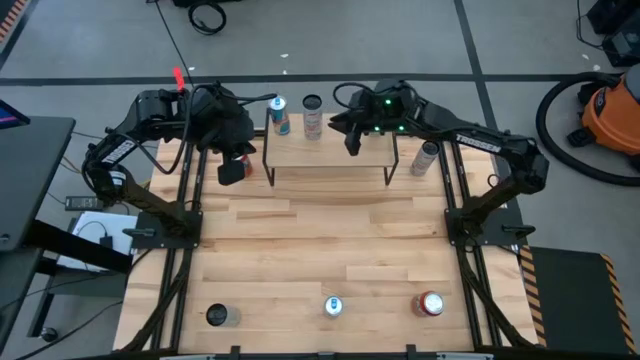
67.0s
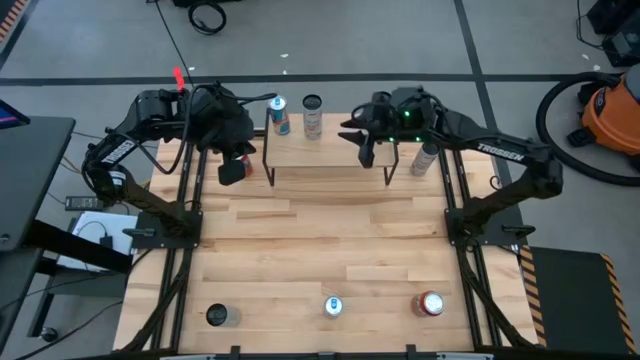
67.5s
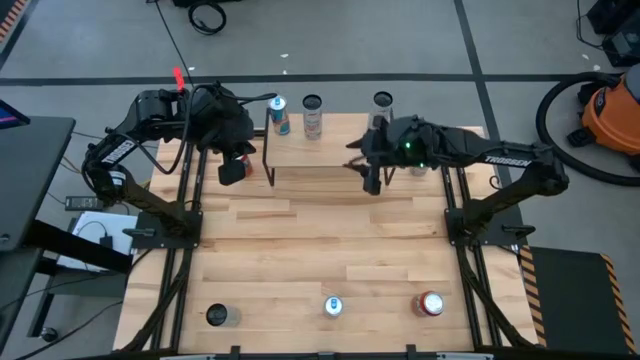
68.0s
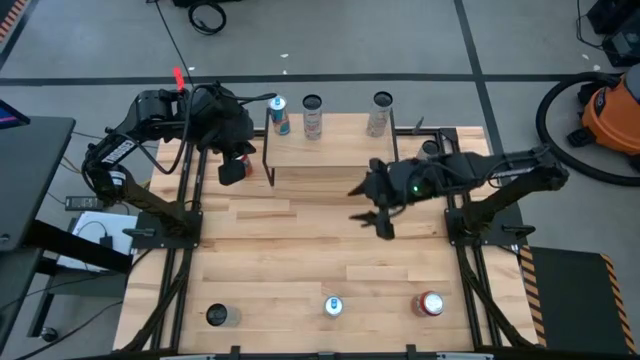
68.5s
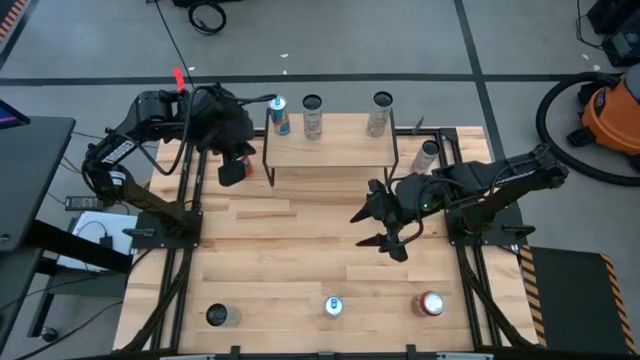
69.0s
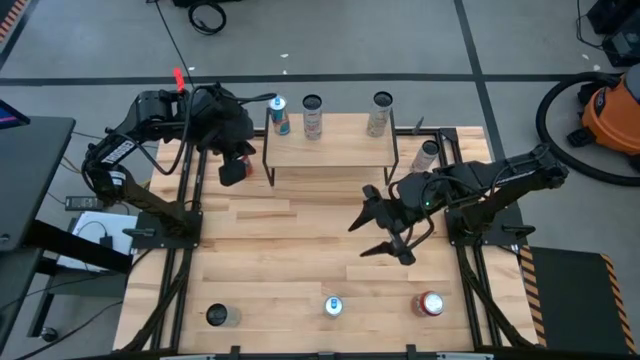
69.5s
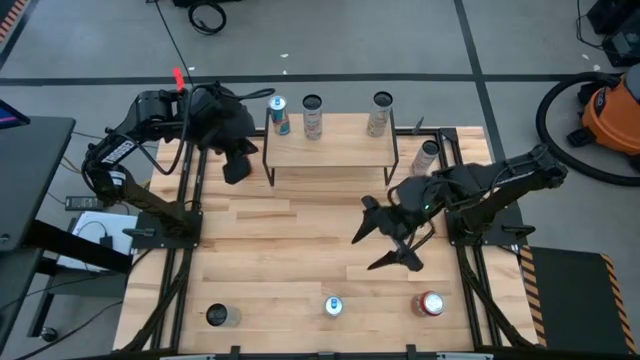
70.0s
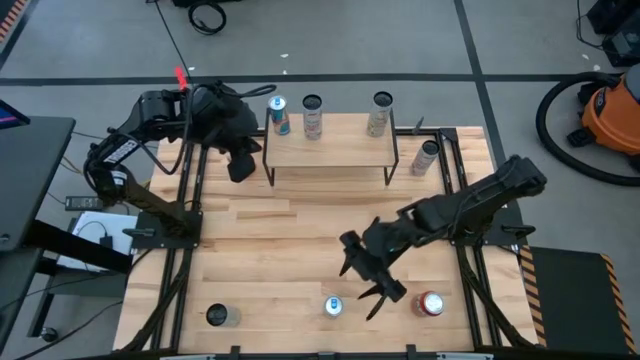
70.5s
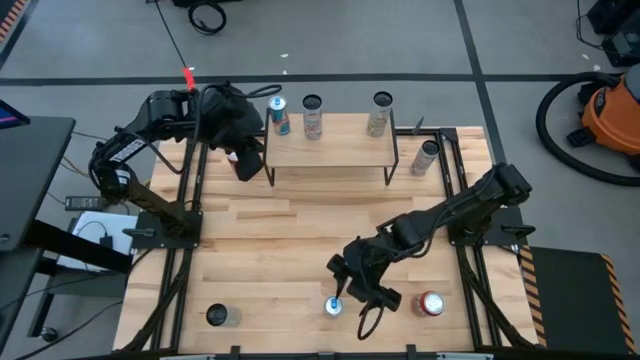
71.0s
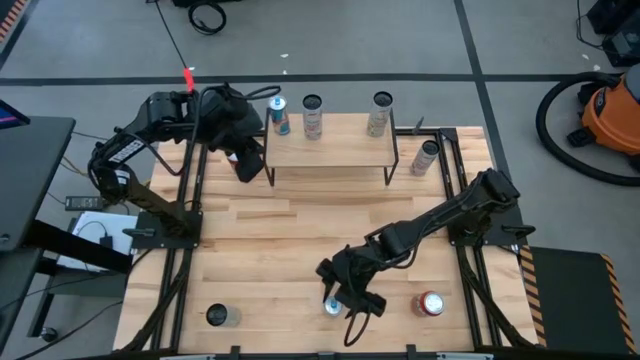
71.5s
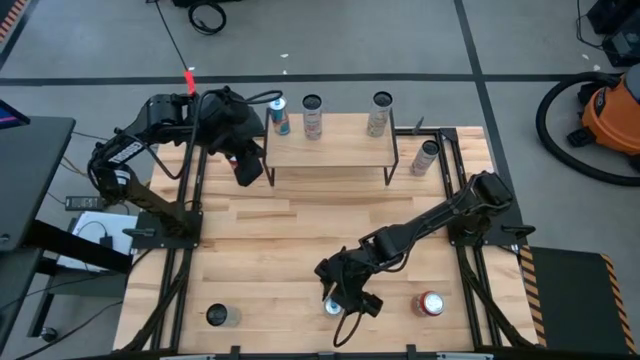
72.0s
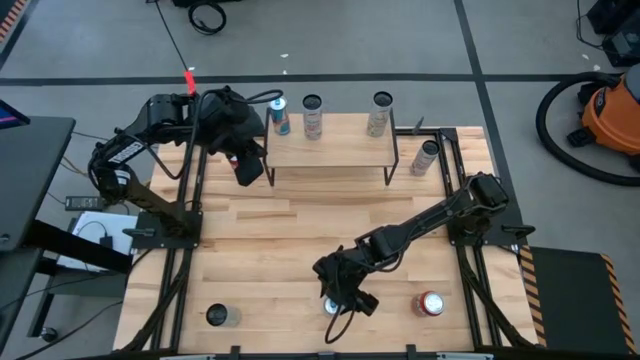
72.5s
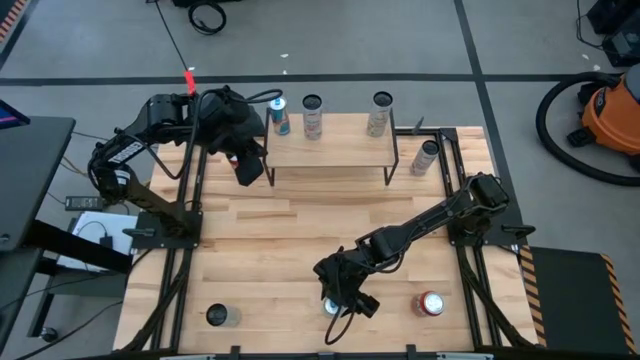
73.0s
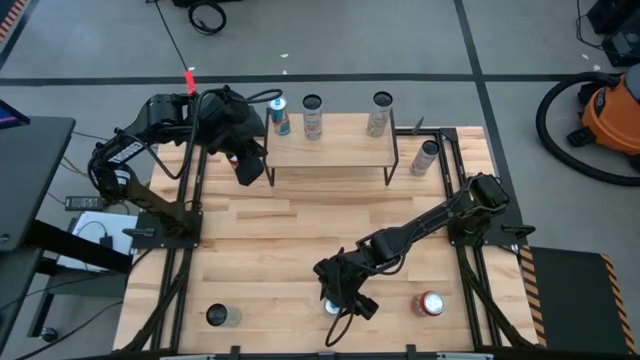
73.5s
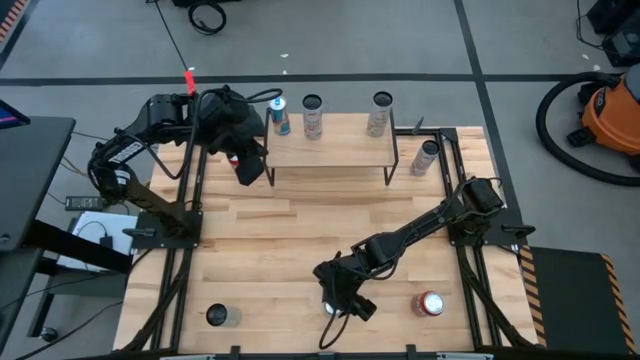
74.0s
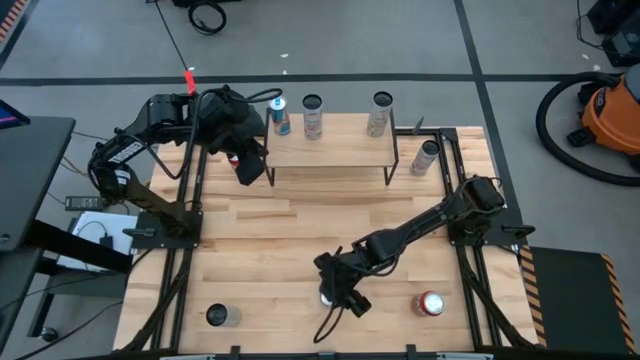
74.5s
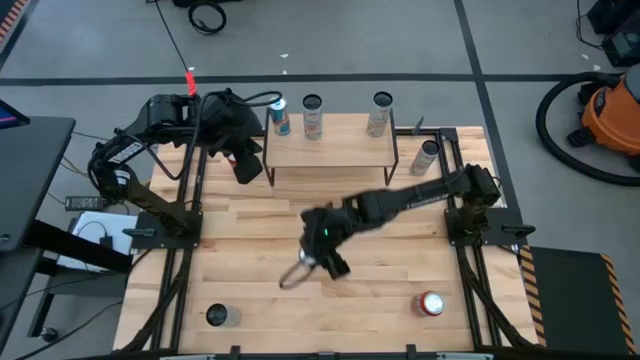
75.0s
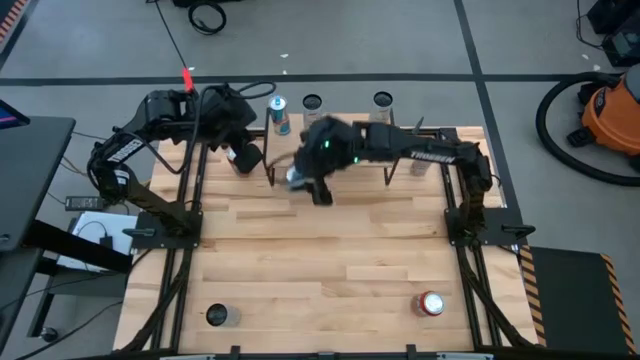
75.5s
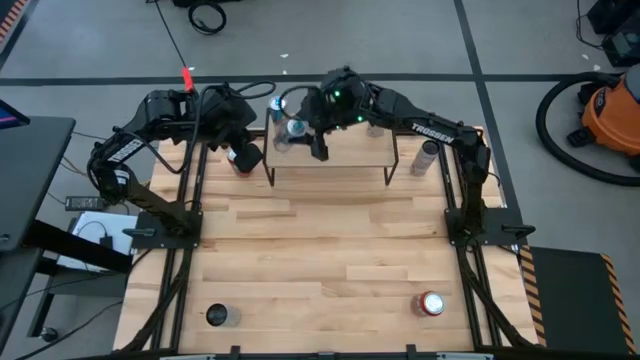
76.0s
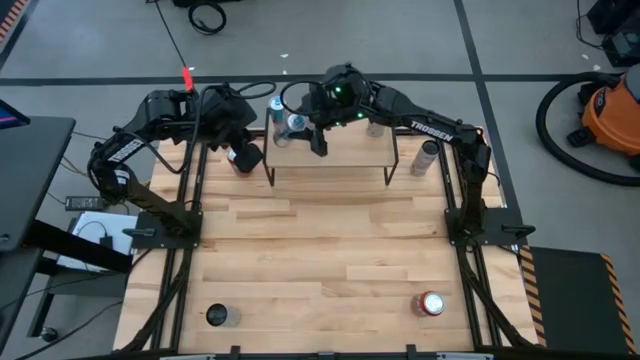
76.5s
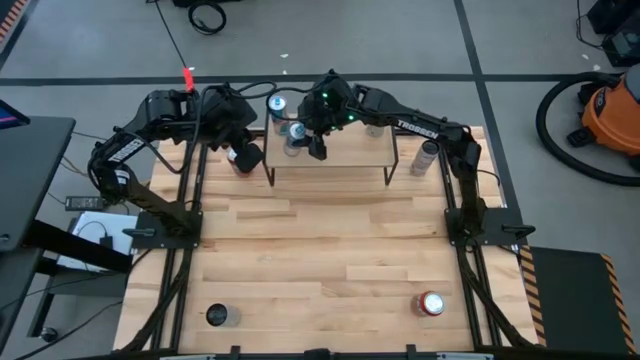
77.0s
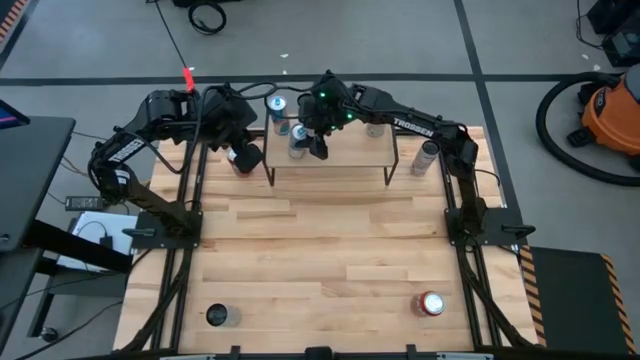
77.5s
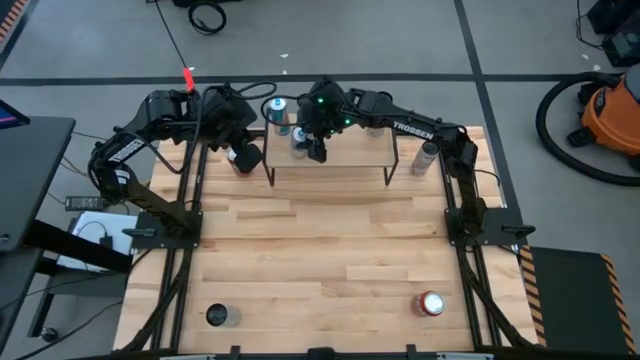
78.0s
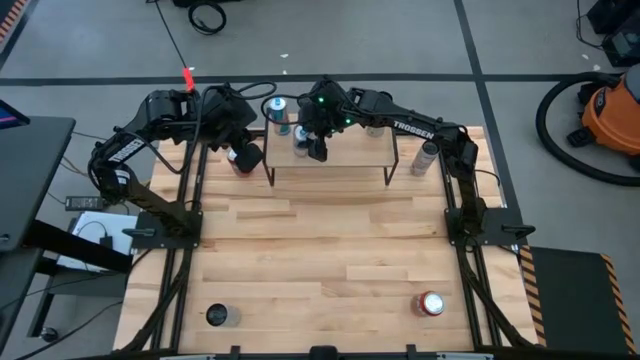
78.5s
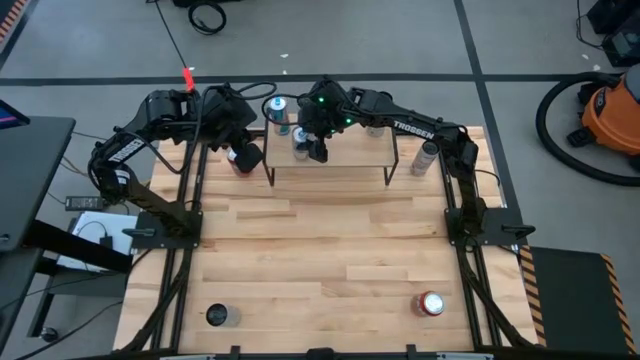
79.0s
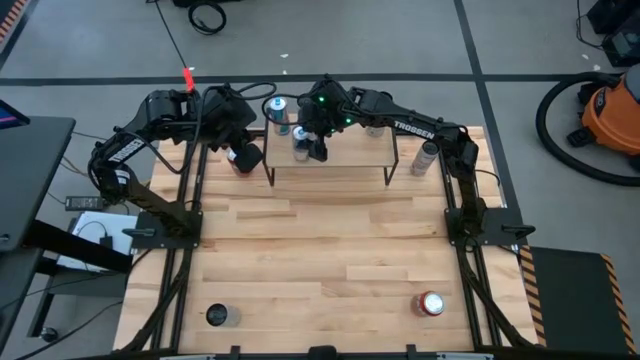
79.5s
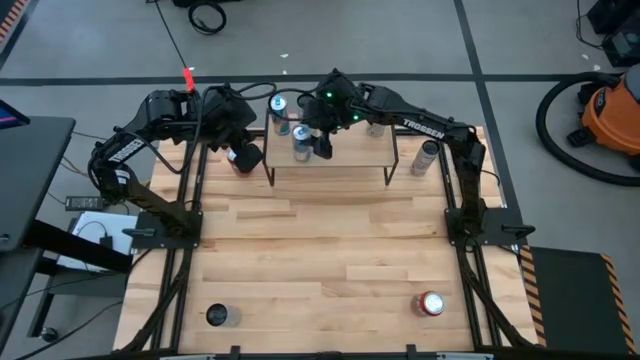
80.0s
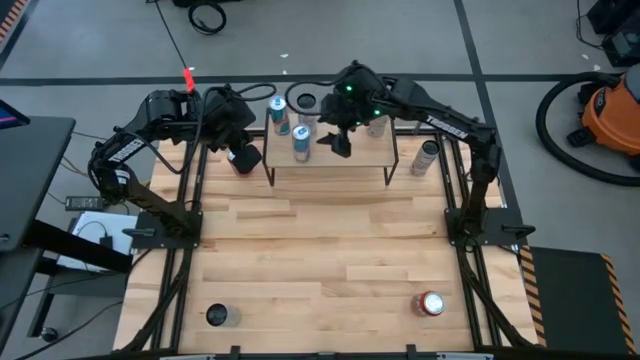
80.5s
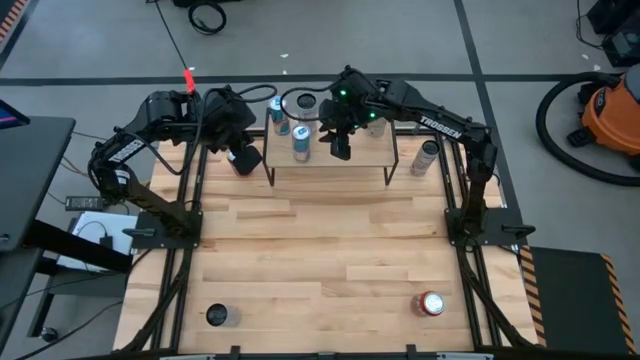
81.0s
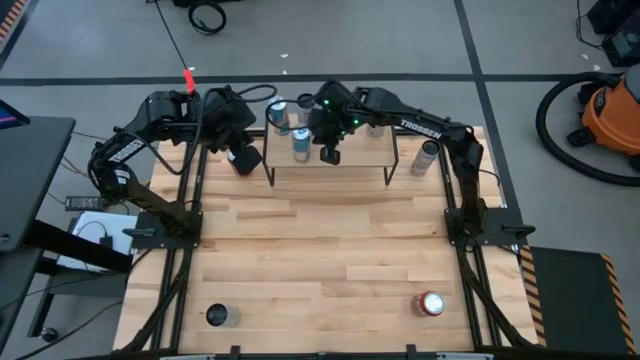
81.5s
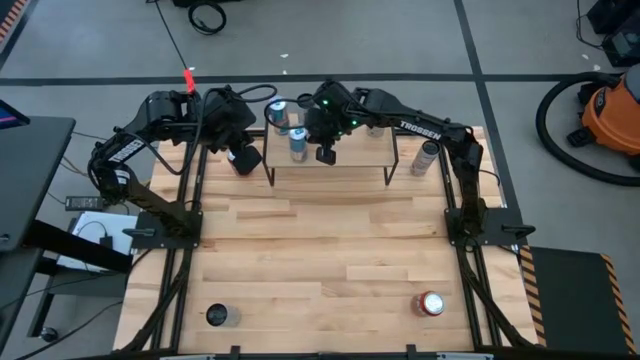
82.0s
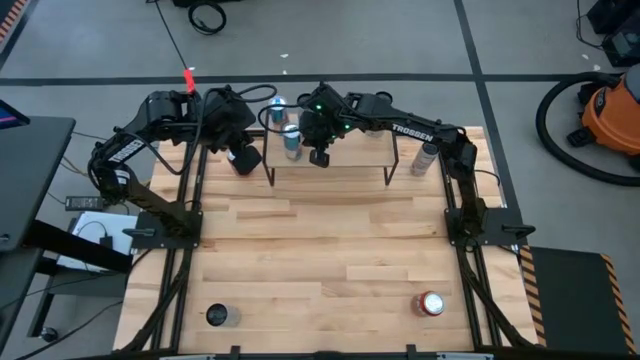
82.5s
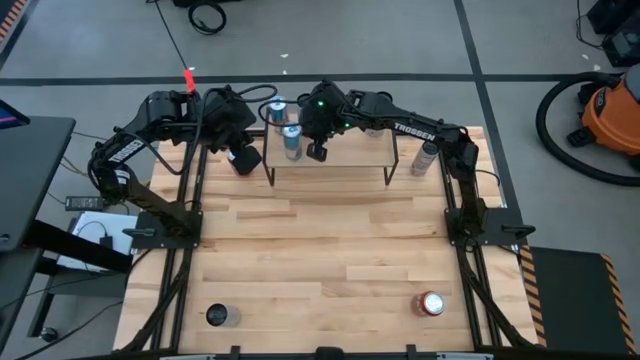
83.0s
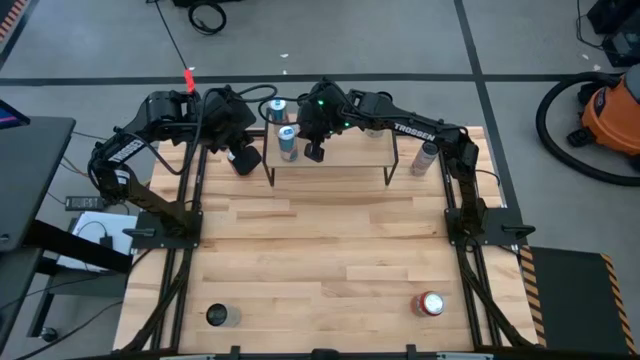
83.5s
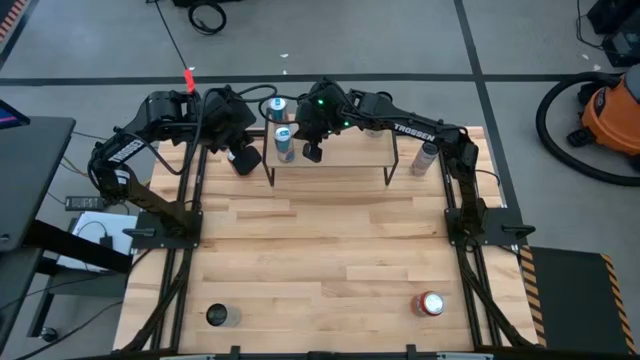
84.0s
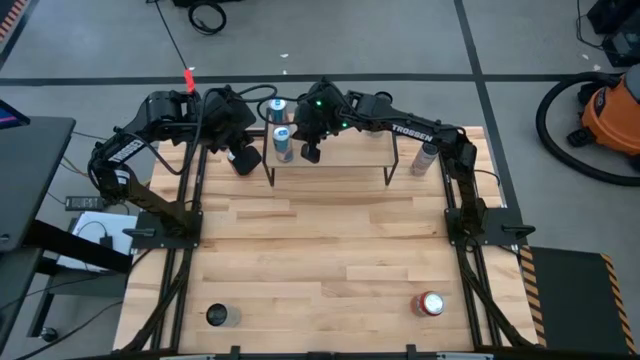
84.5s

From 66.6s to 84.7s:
Task: Place canned beverage on shelf
Put the blue soda can on the shelf aligned with the other blue soda can

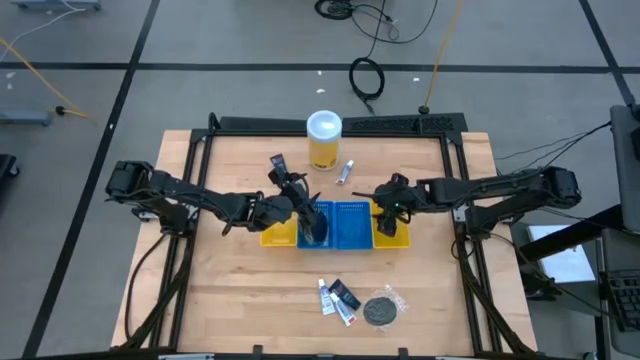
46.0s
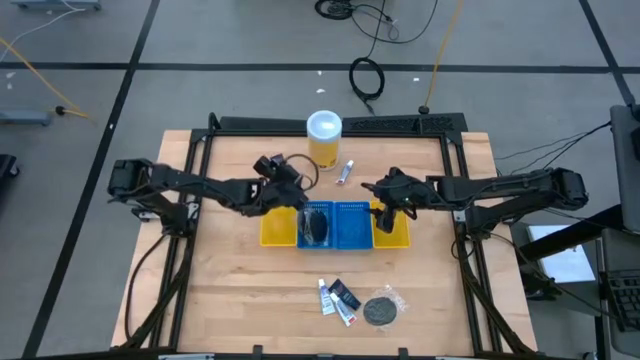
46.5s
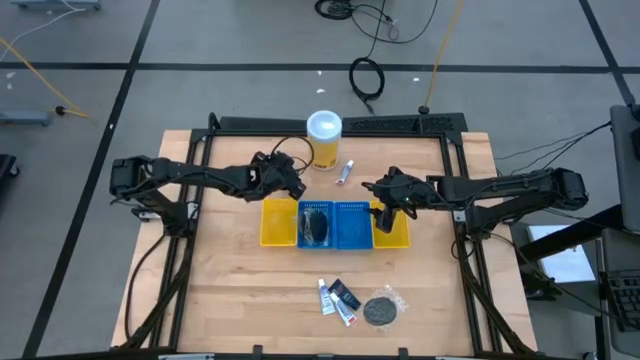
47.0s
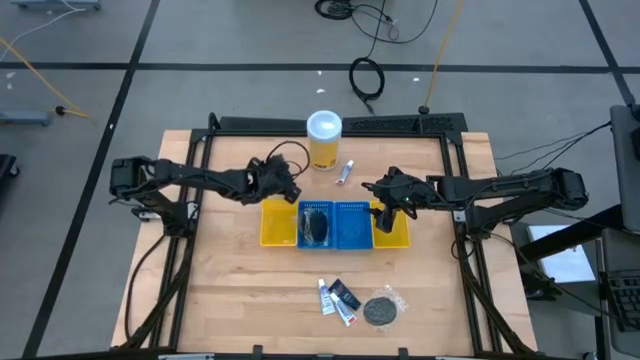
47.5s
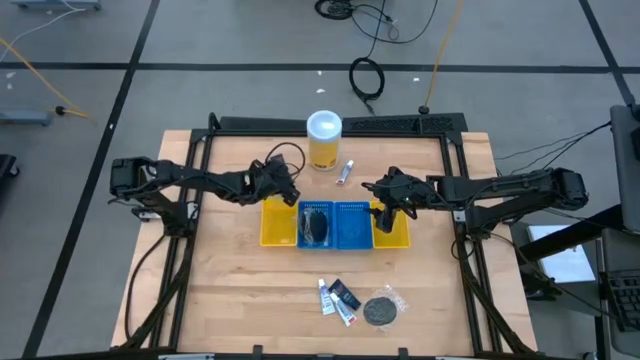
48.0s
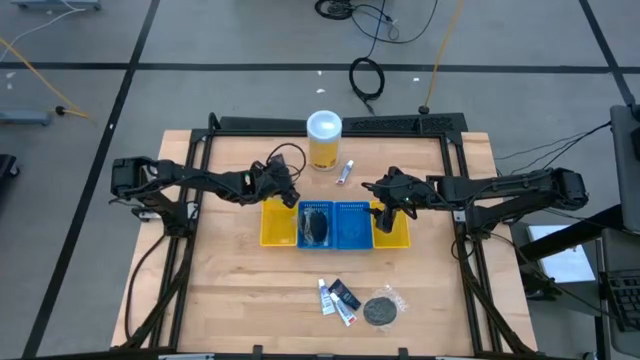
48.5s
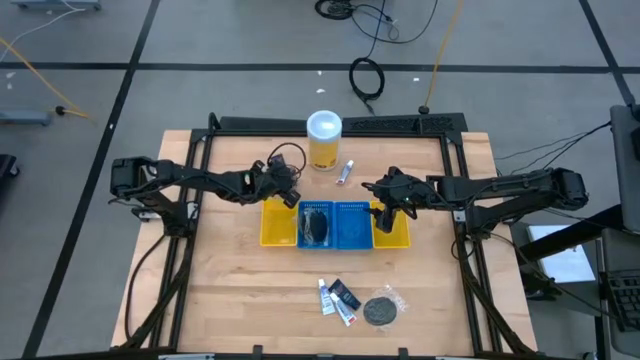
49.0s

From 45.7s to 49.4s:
Task: Pick & Place Travel size toiletries
Put the black deodorant into the right yellow bin
